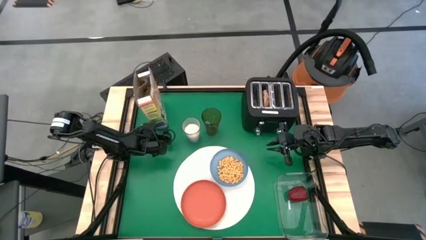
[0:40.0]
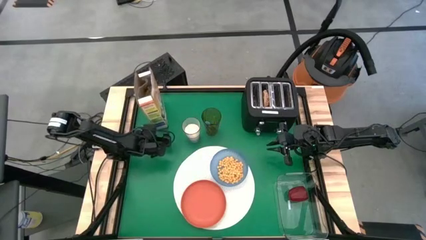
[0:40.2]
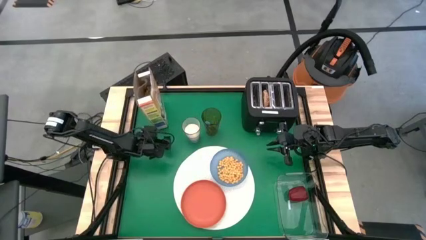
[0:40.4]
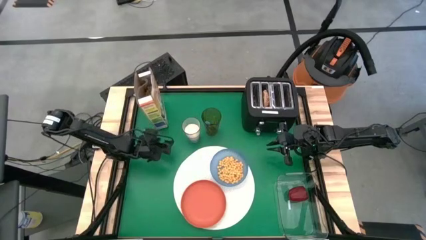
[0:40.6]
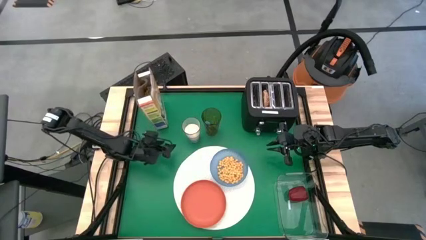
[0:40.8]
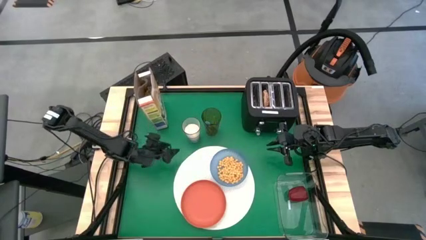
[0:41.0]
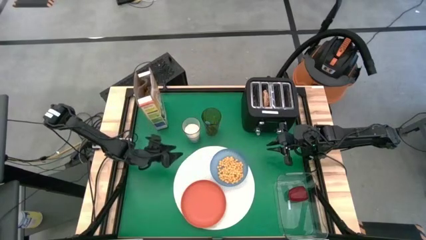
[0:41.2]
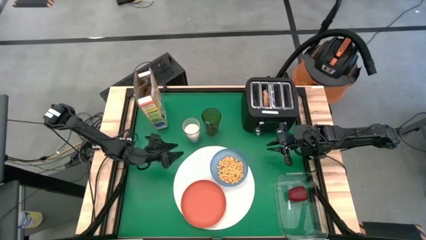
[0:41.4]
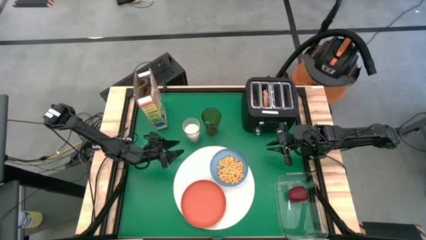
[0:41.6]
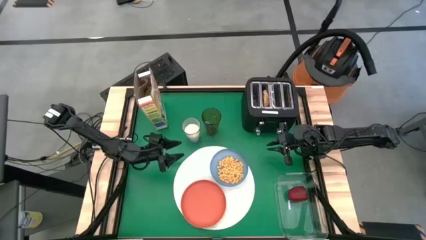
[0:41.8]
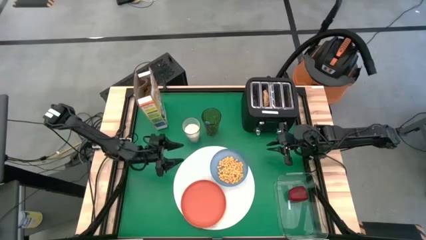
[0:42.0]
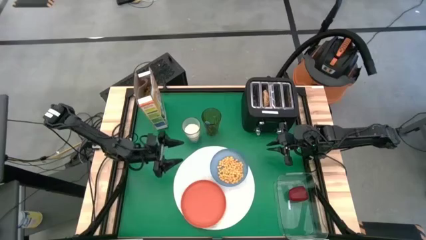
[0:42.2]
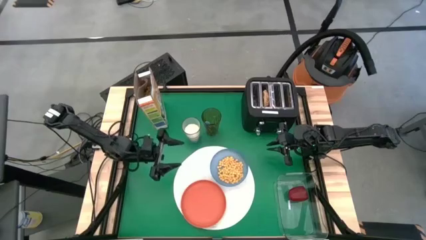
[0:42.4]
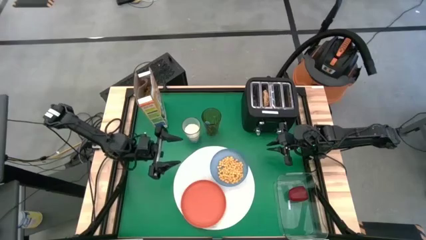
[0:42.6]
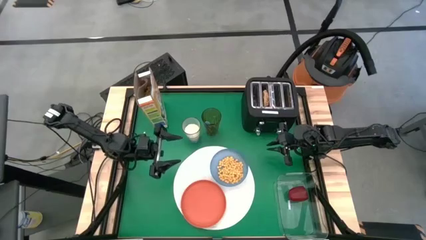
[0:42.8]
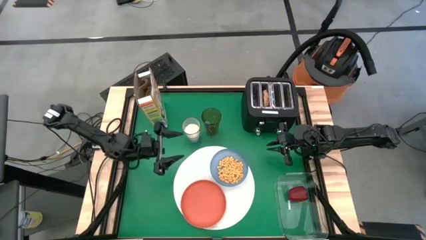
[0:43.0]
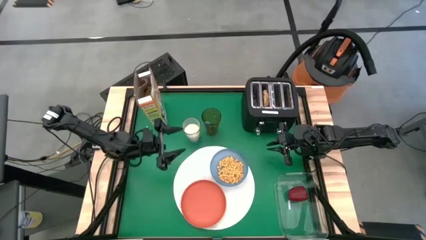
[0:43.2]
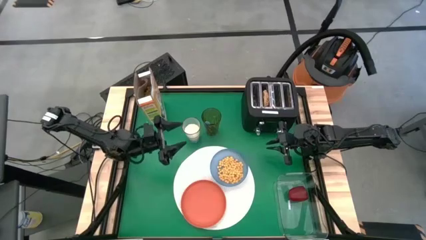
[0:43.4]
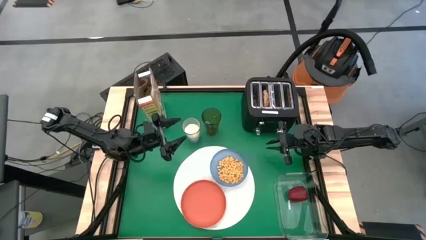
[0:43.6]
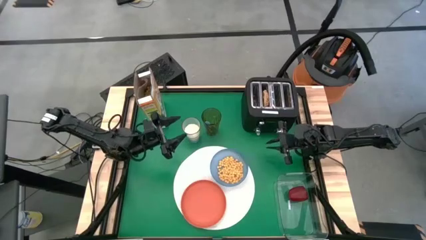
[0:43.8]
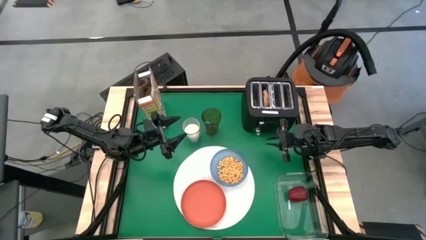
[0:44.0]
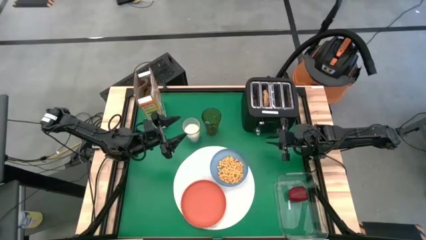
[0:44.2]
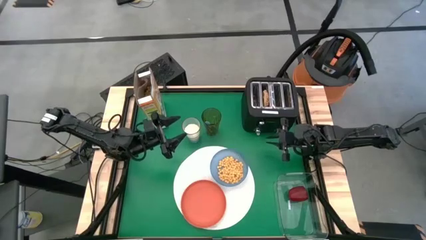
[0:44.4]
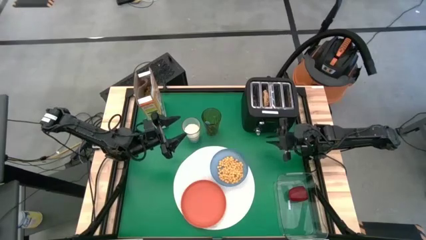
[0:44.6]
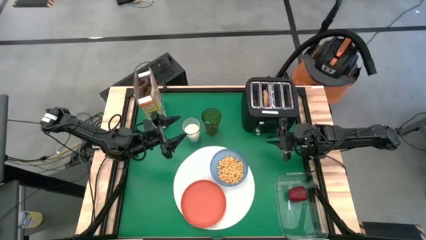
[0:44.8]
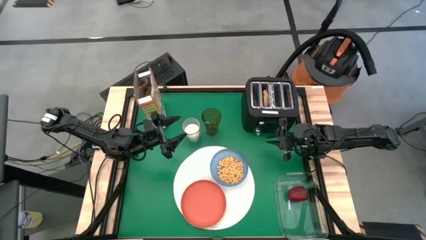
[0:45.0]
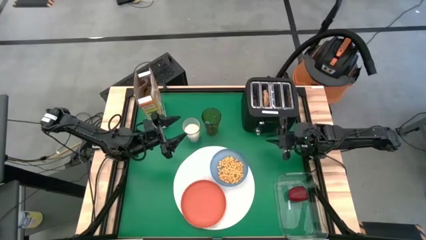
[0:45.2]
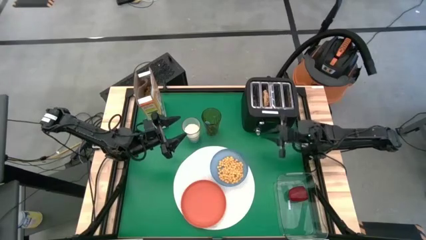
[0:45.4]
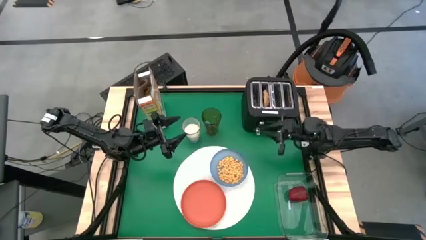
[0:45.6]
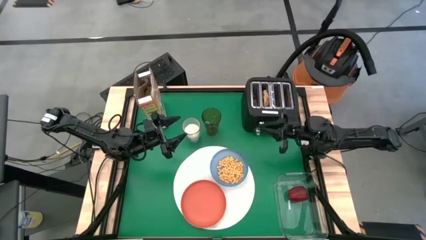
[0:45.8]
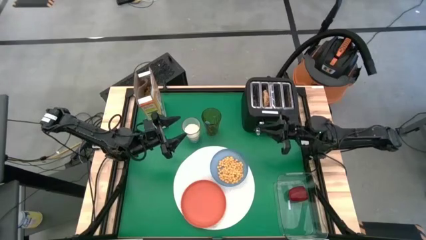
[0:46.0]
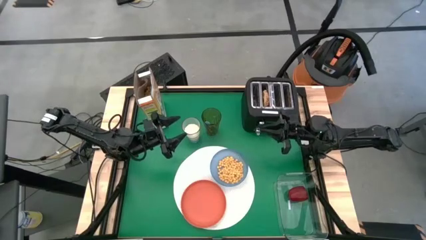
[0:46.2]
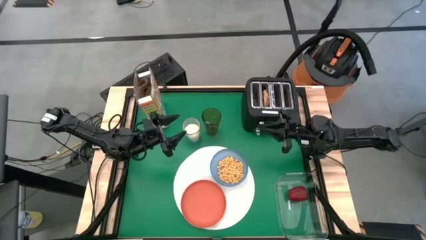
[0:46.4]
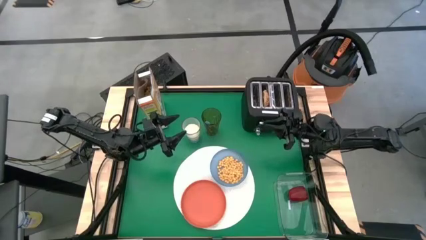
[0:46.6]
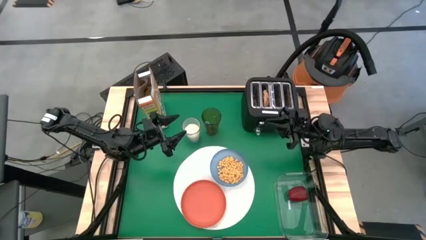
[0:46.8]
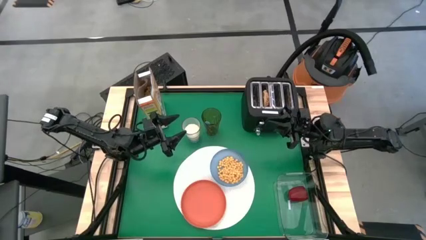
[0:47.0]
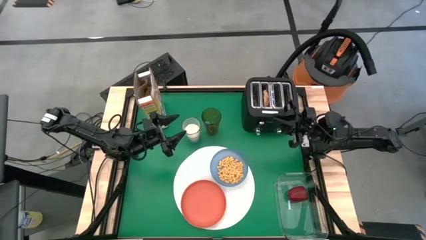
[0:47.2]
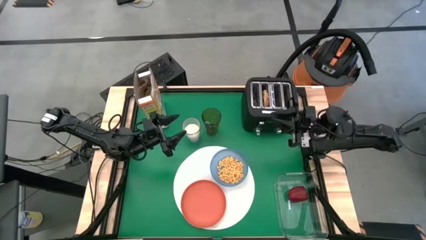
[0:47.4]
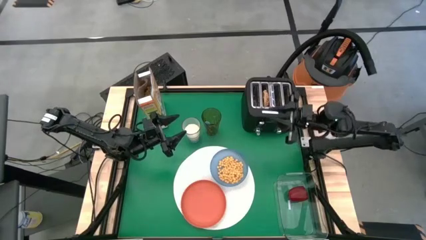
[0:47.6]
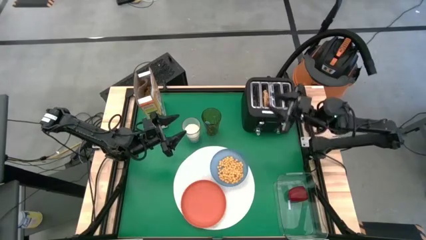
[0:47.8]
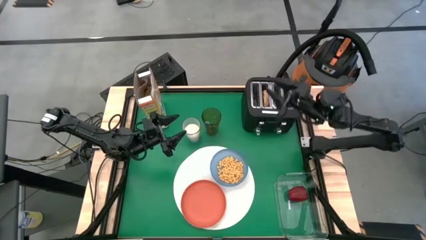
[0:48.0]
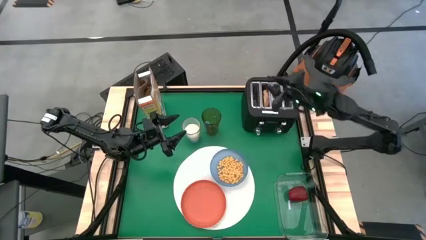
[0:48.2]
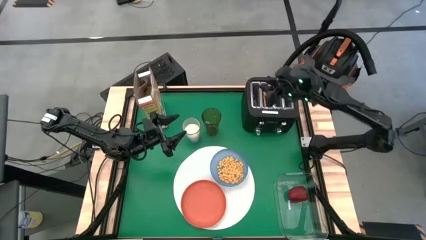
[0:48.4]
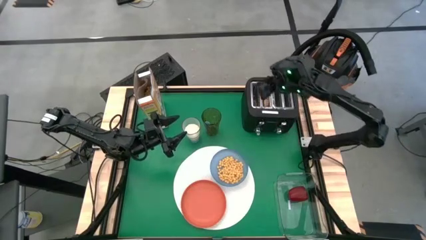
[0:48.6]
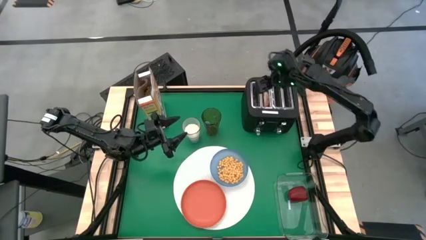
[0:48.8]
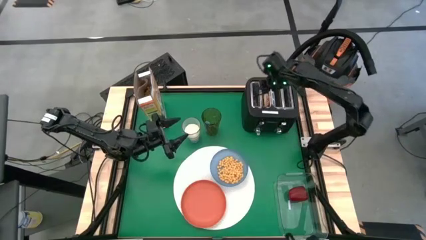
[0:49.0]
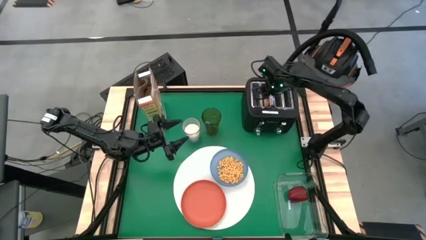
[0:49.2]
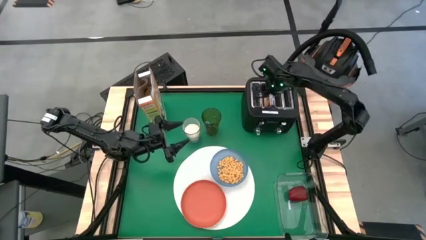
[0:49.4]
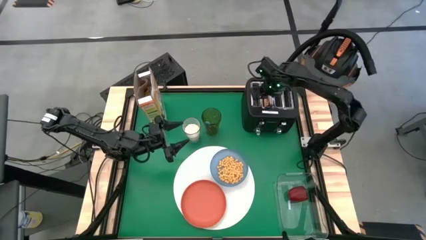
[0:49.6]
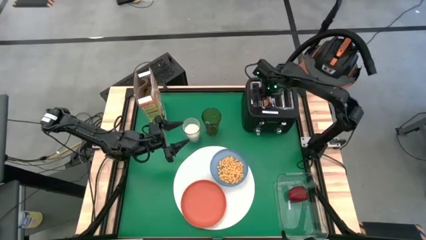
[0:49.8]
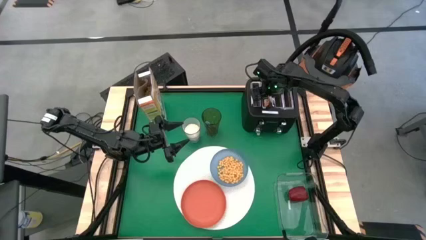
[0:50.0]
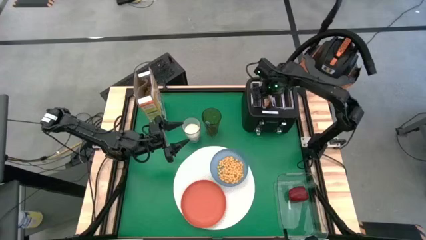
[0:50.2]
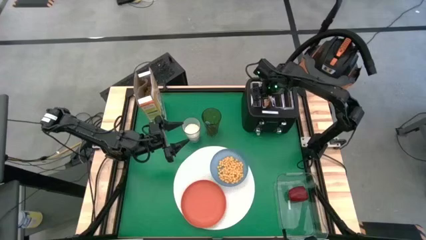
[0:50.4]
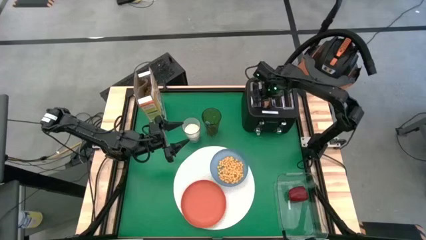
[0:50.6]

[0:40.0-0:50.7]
Task: Arrange a breakfast setting
Put the bagel from the toaster on the orange plate
